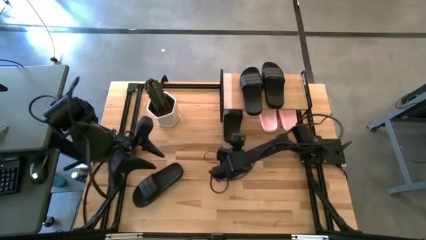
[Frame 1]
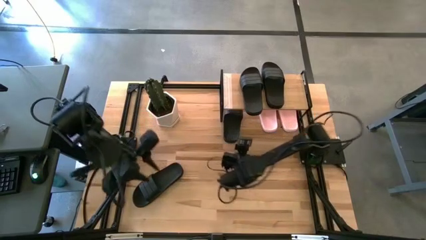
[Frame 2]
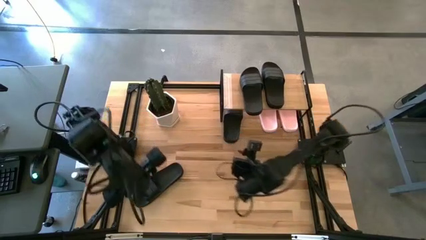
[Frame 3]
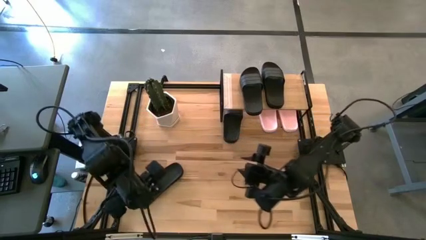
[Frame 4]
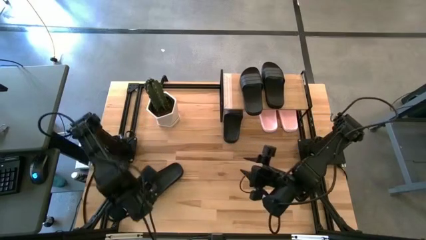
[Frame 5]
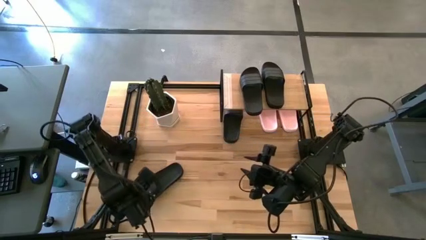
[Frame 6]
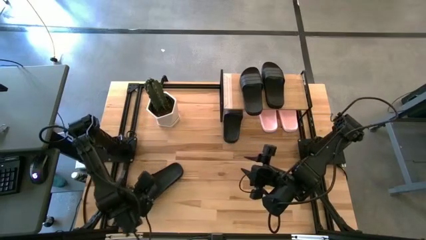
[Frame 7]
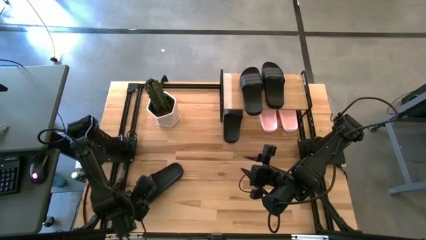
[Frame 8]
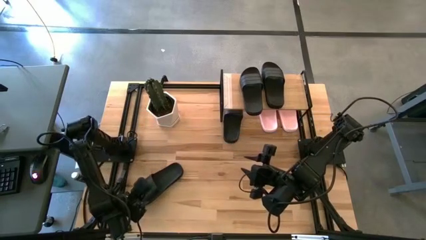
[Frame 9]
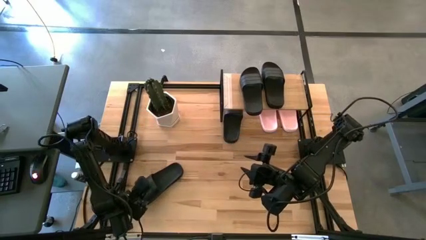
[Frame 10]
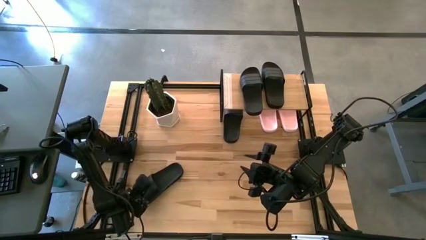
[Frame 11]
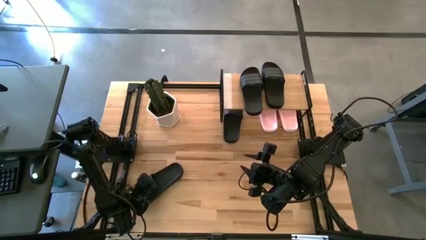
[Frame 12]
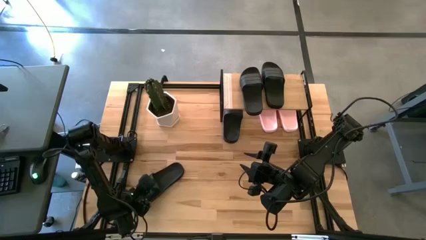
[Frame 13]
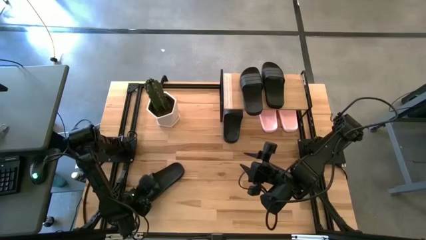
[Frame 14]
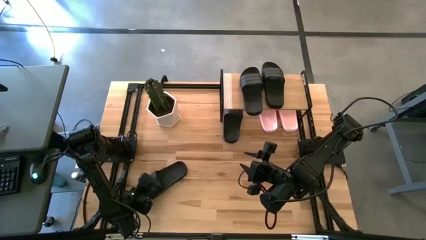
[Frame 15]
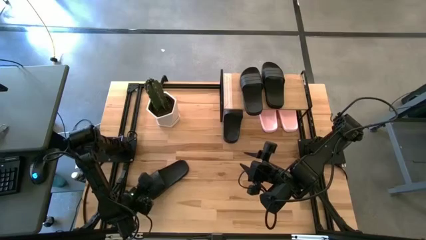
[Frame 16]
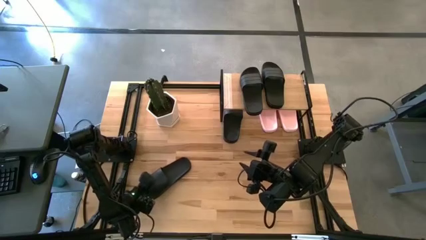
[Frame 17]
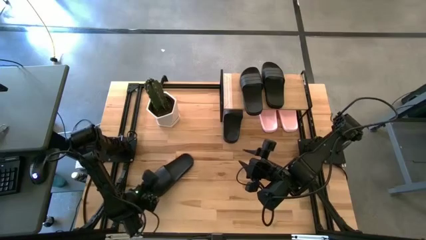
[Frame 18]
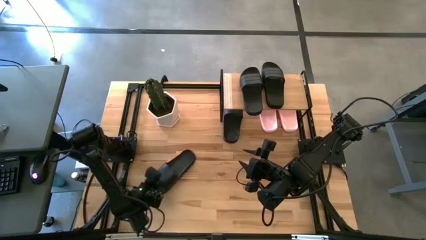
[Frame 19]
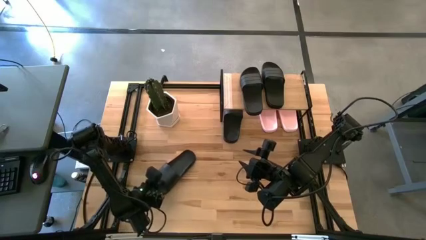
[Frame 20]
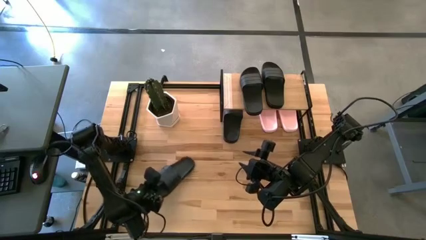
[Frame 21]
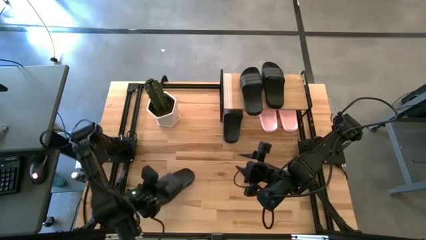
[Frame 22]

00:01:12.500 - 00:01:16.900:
Task: Pick and place slides into the shelf
Put the black slipper under the shelf

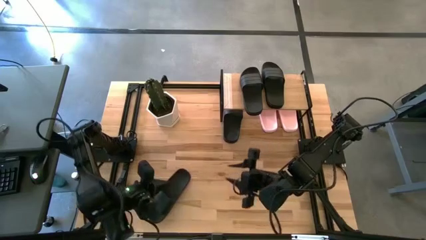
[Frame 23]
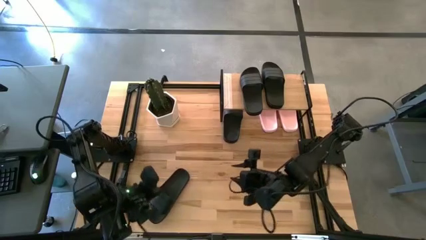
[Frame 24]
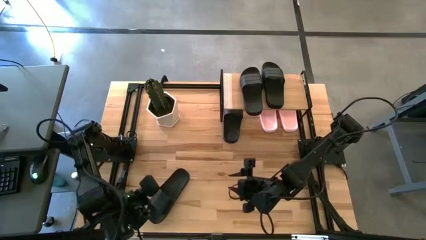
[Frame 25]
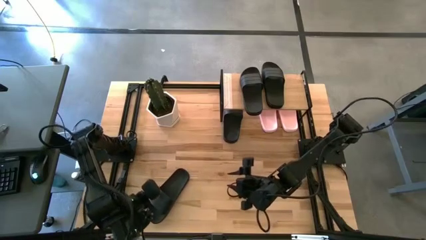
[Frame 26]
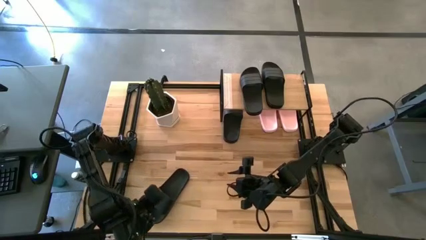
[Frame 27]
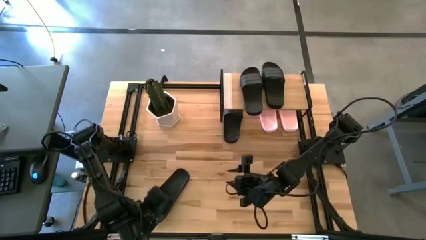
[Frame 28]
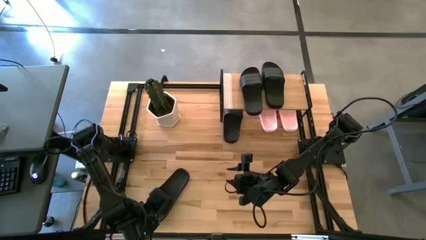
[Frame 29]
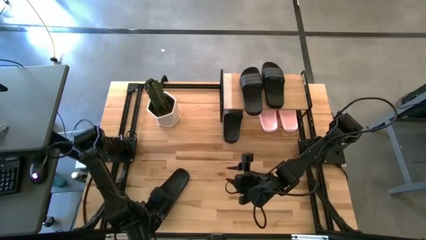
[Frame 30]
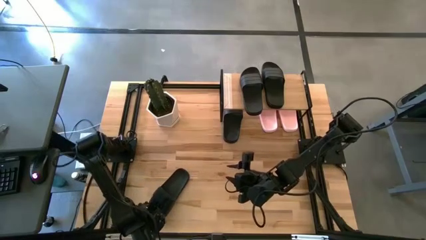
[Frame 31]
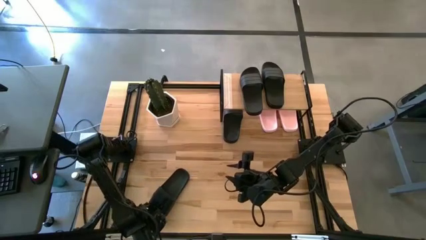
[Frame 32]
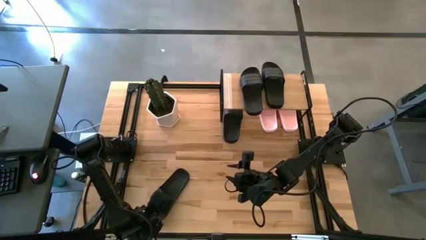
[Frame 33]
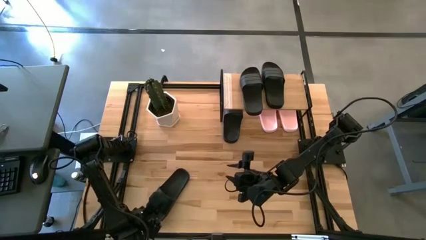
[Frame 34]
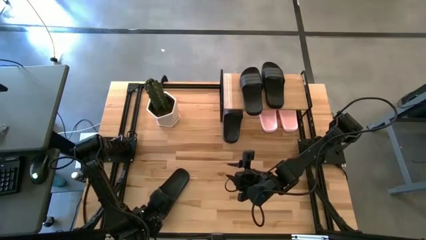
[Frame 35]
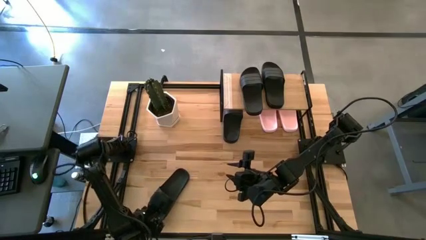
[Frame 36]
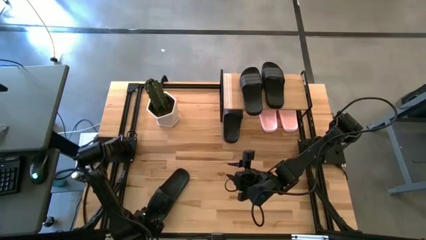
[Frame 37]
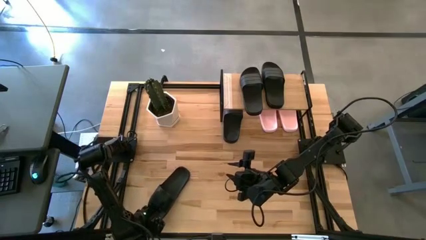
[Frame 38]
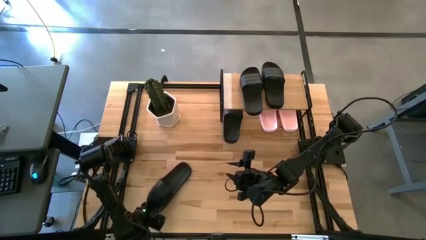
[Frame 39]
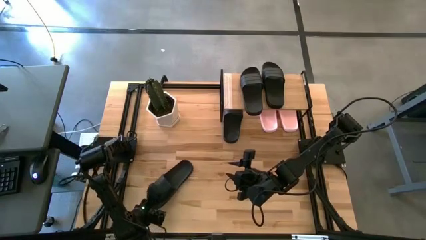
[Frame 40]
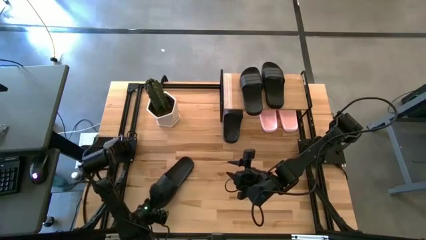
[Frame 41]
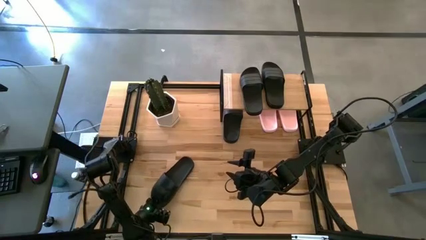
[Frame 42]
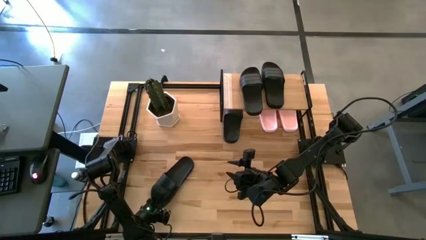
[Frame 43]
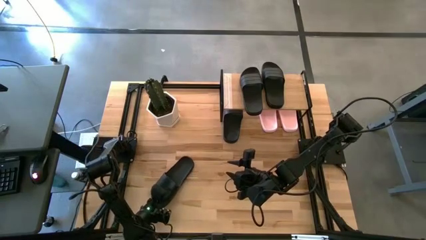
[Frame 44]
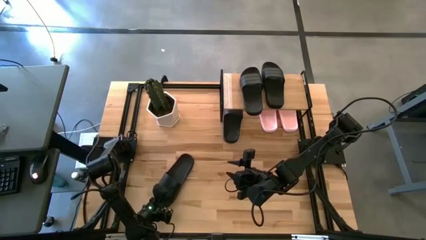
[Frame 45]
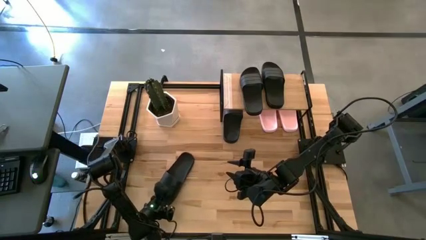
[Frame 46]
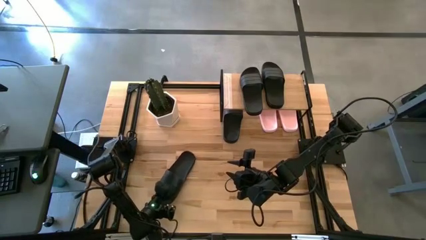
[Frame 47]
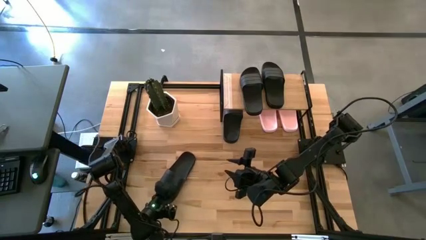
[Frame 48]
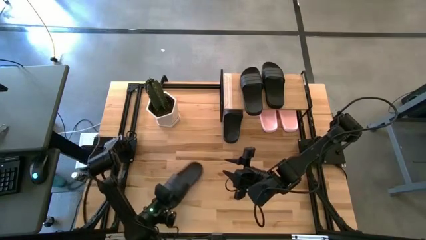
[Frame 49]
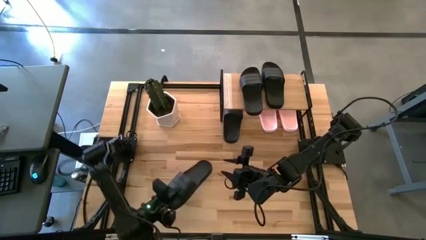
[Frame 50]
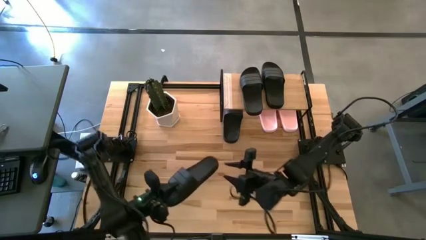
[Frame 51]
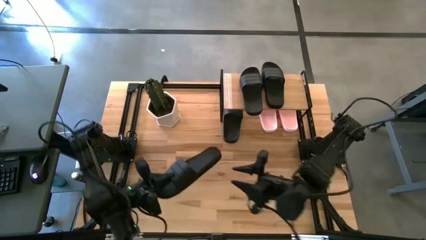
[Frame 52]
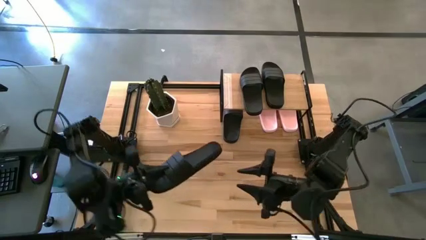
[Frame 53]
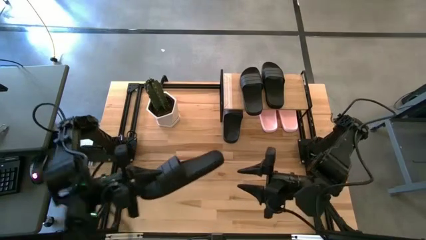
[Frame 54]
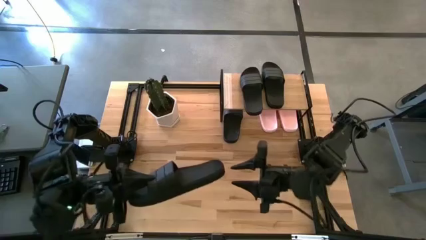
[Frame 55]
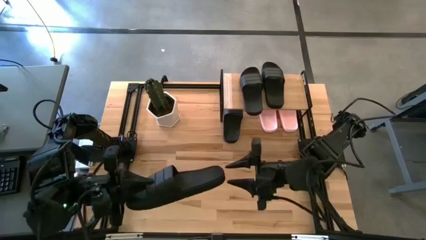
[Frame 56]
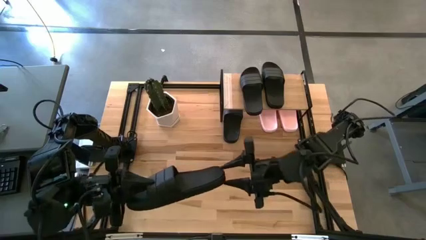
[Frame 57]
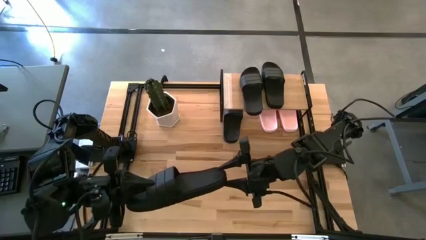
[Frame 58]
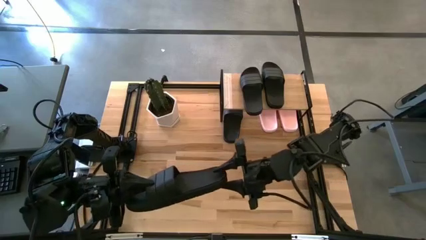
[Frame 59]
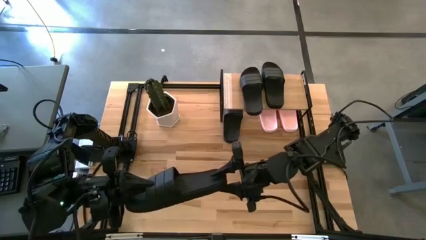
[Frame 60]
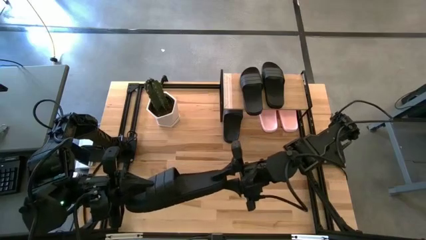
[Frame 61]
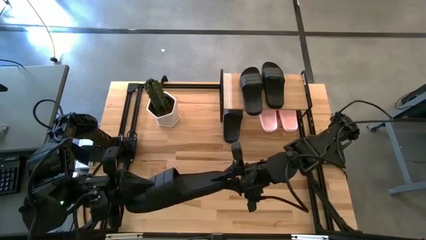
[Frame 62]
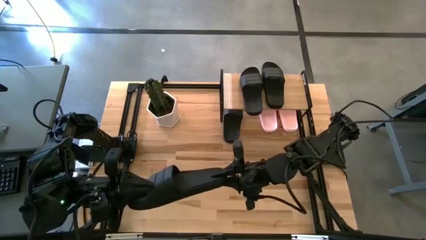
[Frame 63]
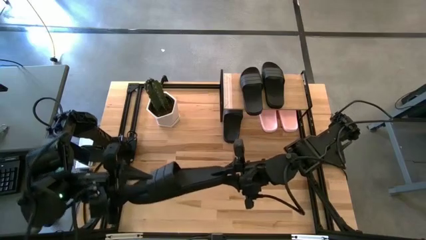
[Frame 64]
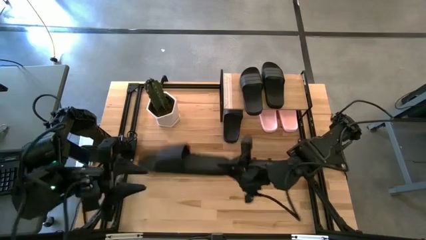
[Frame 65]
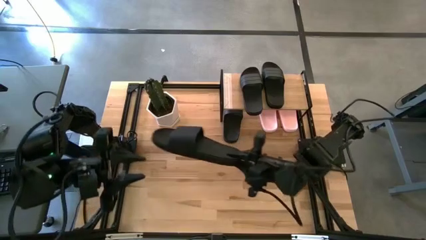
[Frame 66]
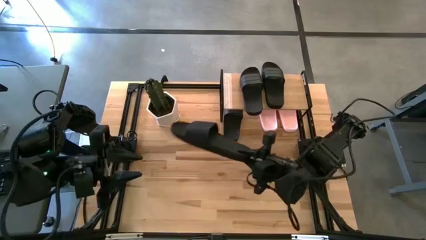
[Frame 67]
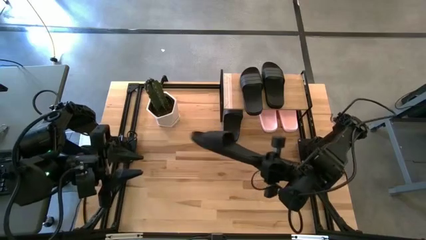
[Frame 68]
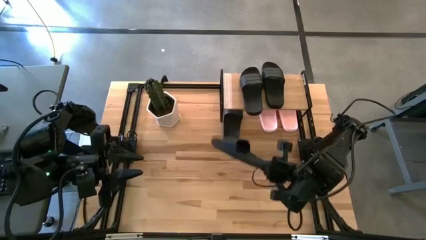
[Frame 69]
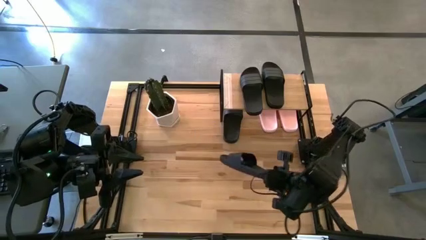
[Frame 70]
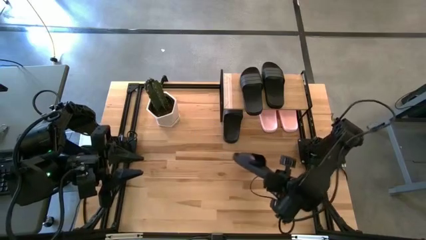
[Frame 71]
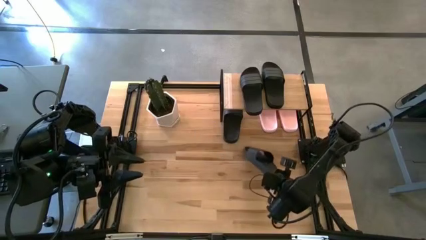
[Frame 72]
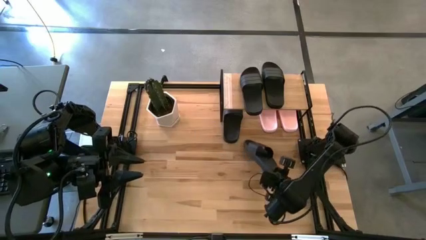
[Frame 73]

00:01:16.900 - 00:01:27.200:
Put the black slipper under the shelf

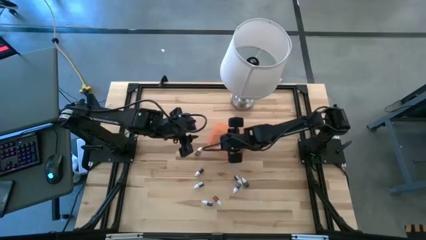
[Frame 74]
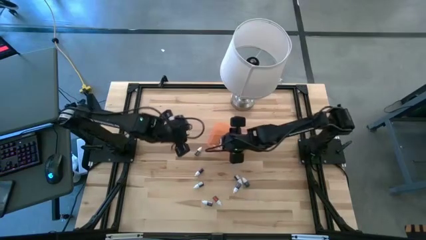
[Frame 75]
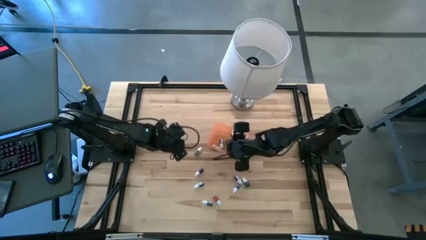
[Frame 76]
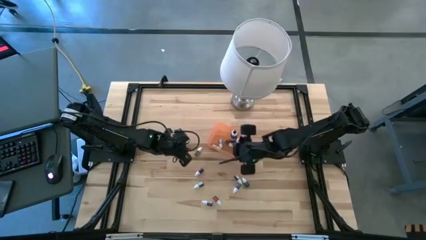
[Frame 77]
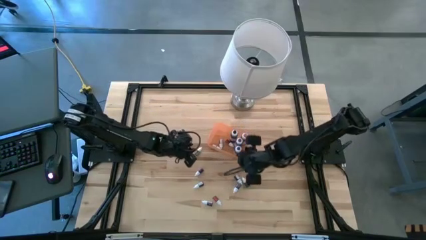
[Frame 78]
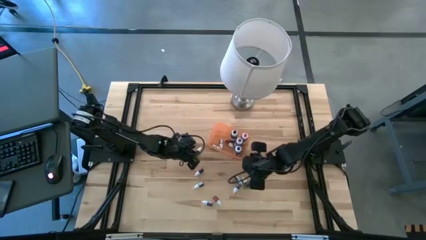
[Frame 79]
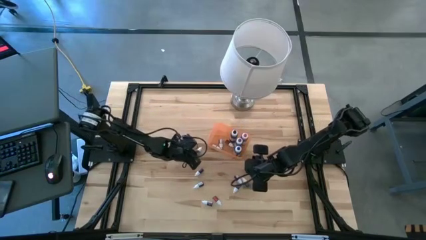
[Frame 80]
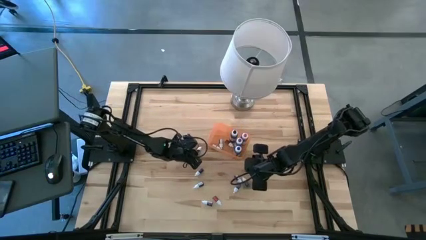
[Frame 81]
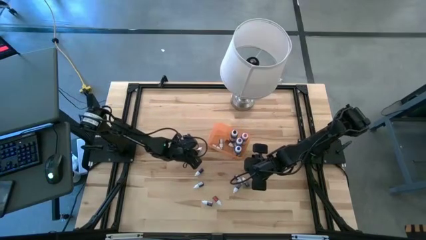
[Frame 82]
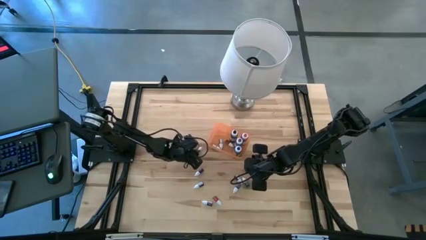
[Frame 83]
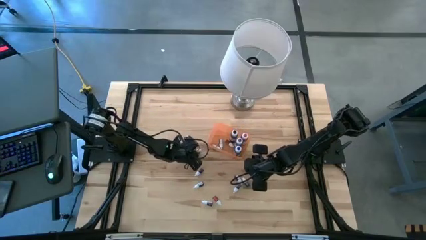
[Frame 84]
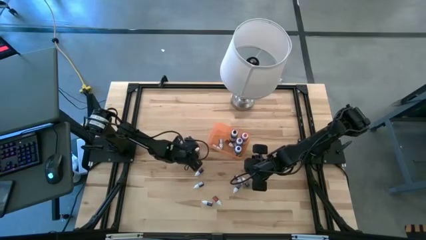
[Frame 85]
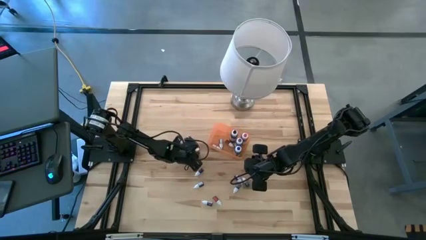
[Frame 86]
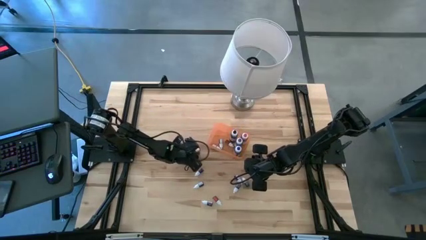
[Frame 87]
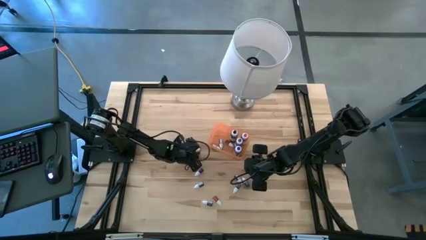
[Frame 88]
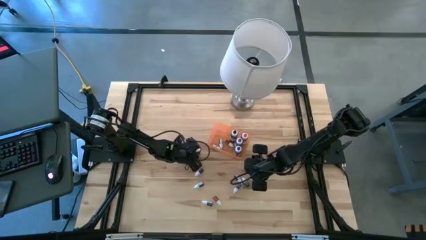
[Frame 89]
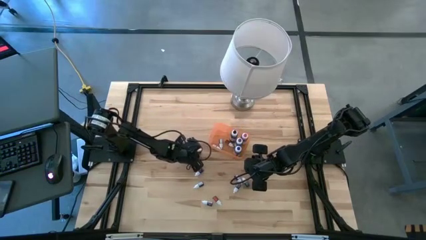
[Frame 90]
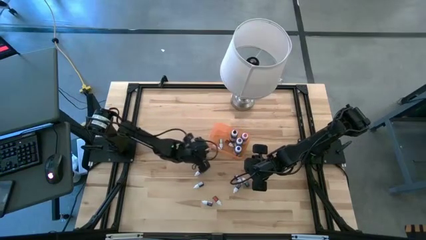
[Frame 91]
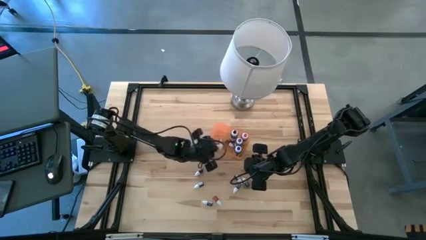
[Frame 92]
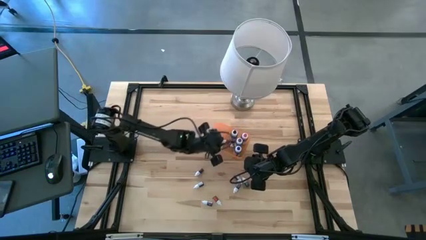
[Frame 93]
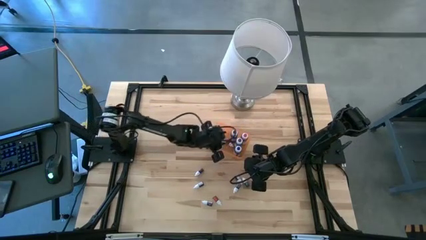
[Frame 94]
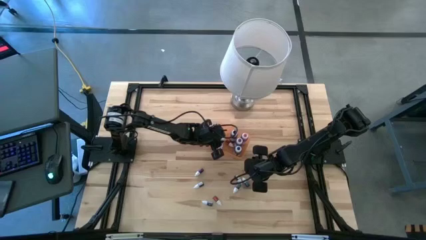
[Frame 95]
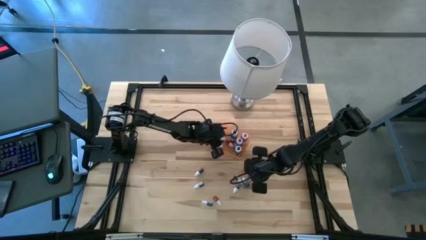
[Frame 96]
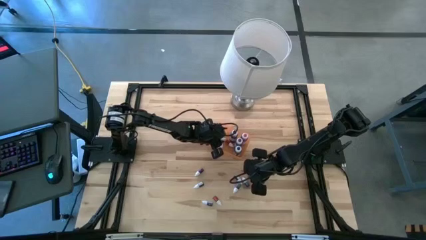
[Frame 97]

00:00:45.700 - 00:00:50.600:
Task: Pick & Place food coloring
Put the small green food coloring bottle into the orange bin
